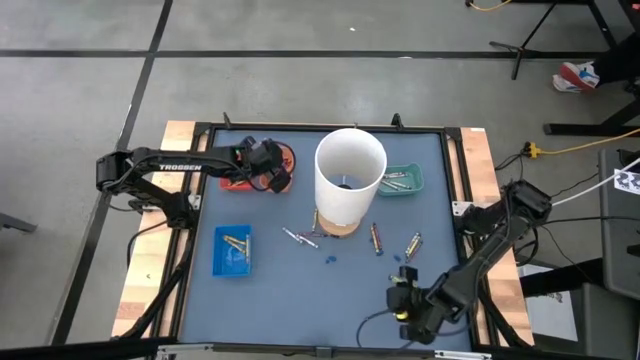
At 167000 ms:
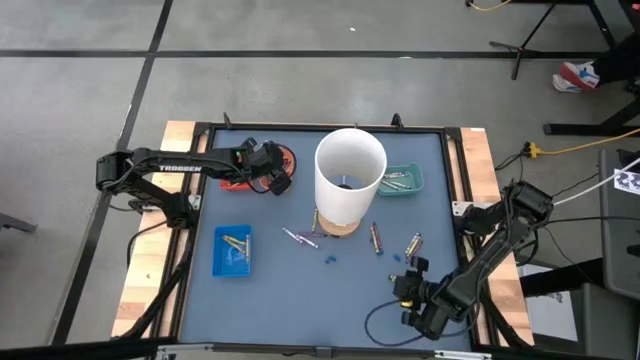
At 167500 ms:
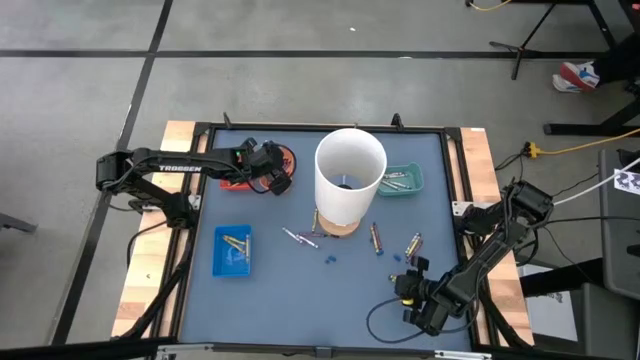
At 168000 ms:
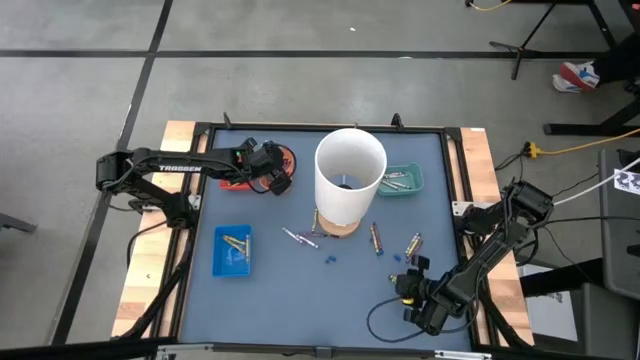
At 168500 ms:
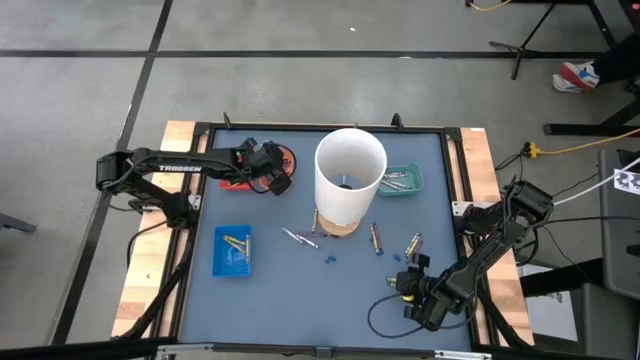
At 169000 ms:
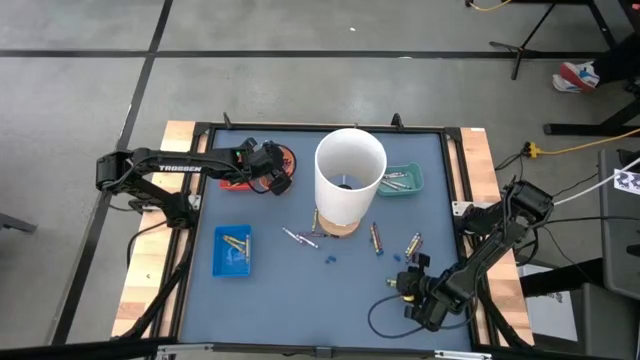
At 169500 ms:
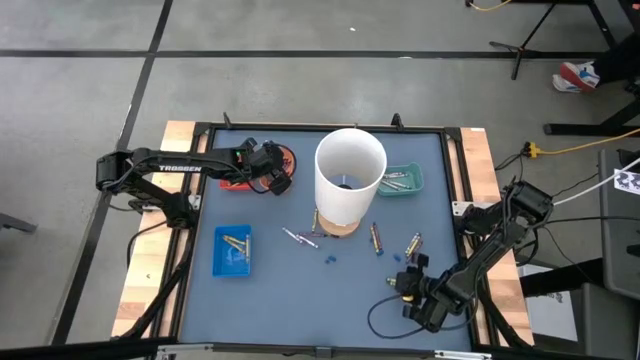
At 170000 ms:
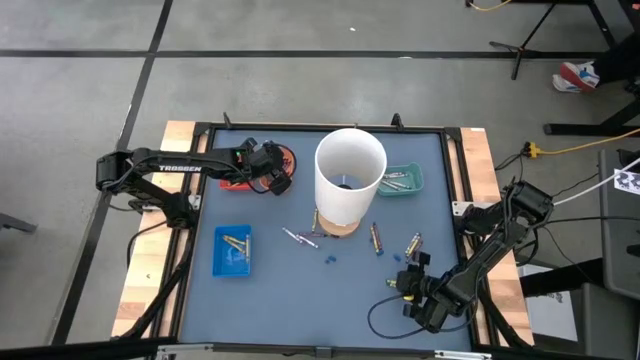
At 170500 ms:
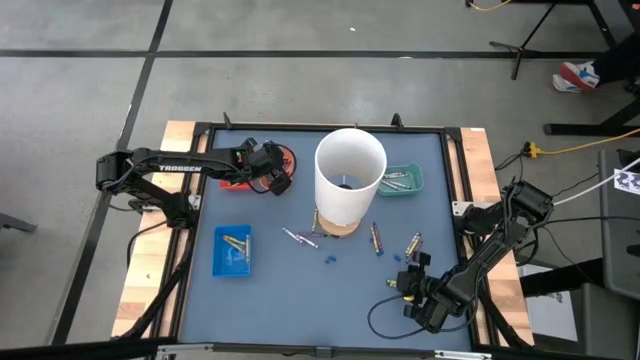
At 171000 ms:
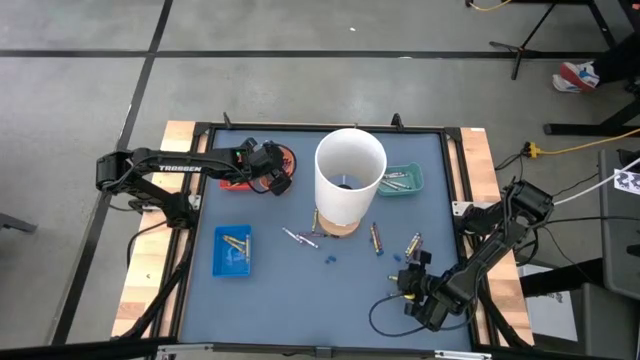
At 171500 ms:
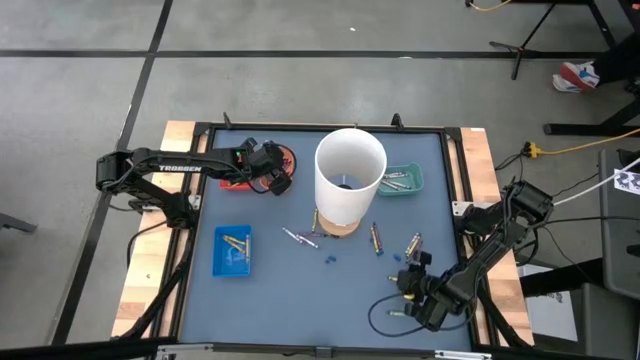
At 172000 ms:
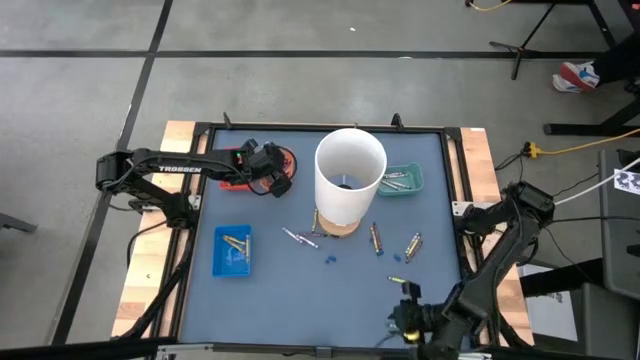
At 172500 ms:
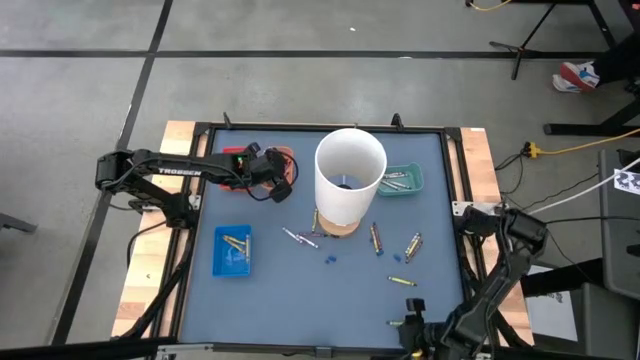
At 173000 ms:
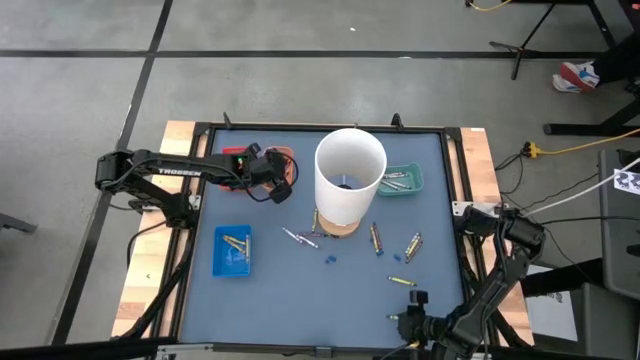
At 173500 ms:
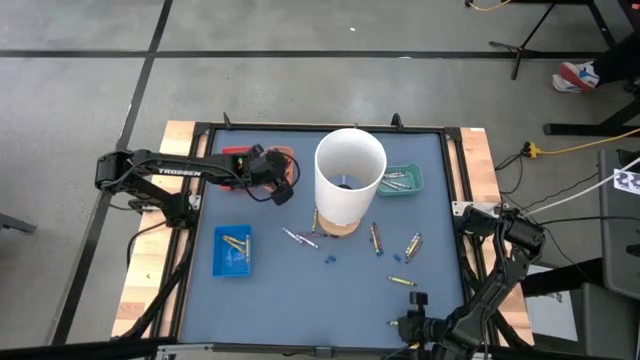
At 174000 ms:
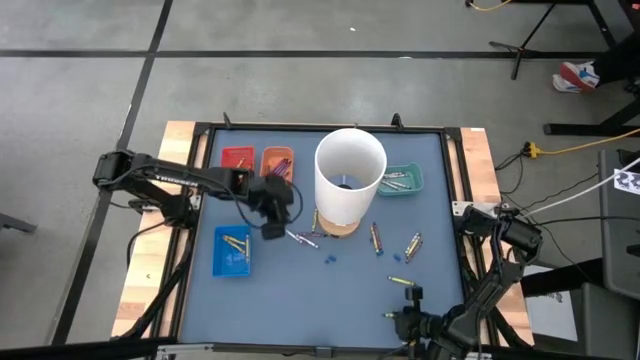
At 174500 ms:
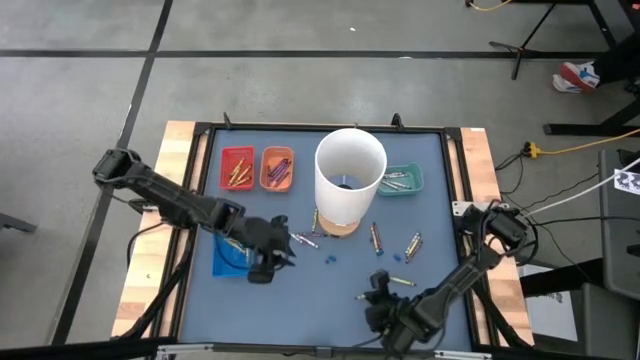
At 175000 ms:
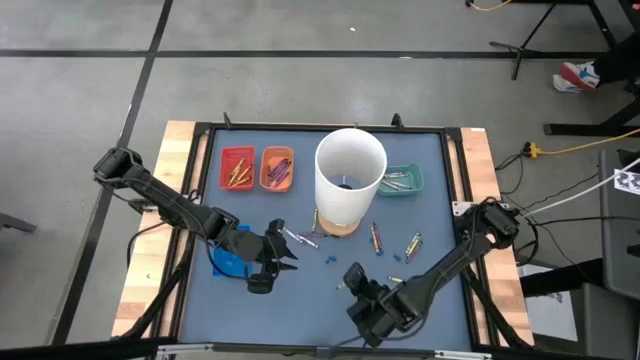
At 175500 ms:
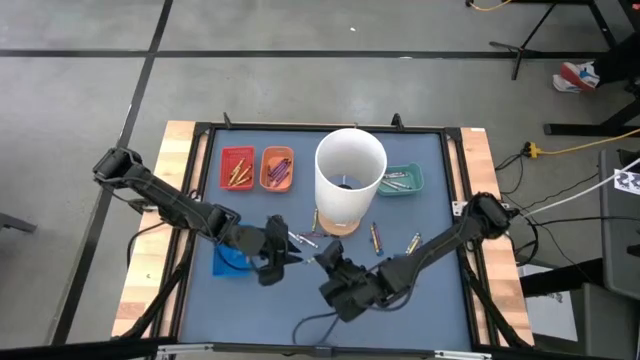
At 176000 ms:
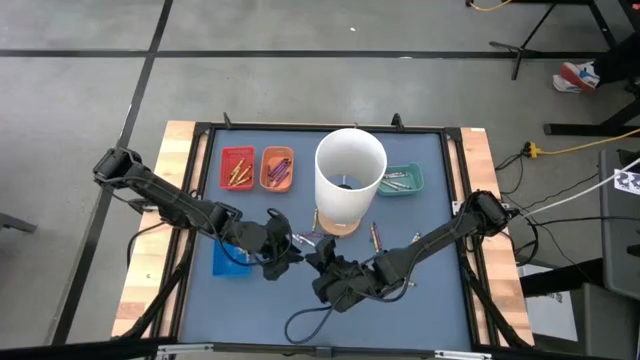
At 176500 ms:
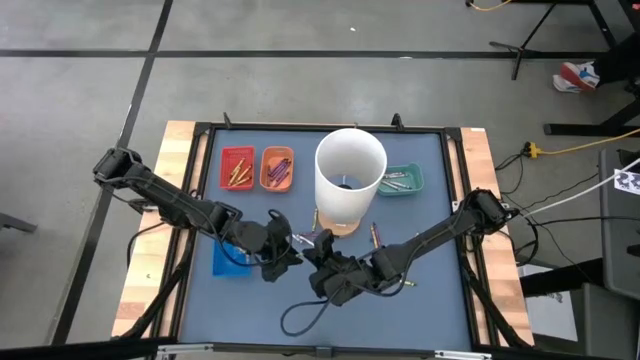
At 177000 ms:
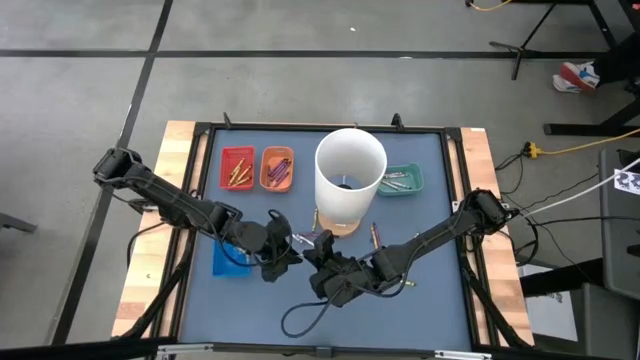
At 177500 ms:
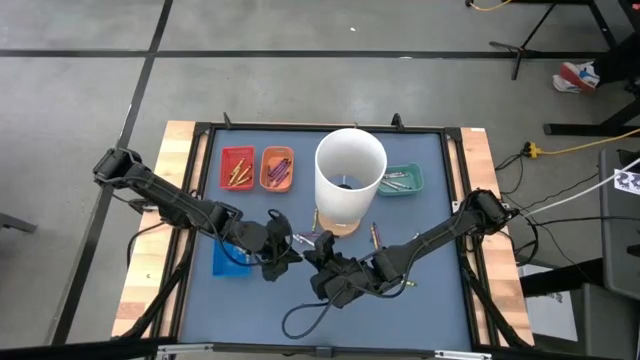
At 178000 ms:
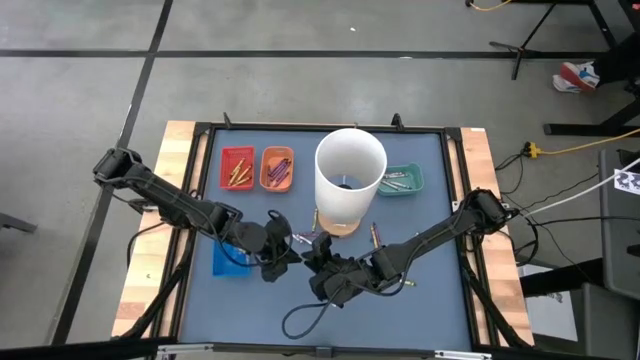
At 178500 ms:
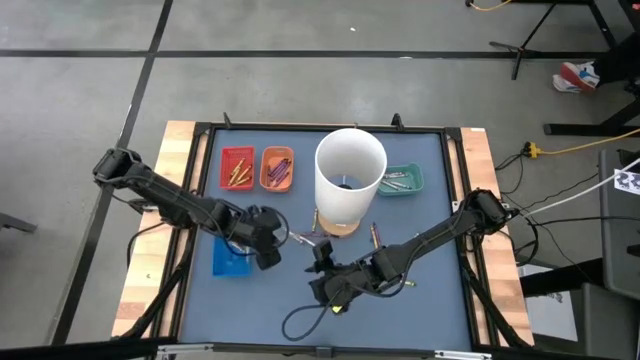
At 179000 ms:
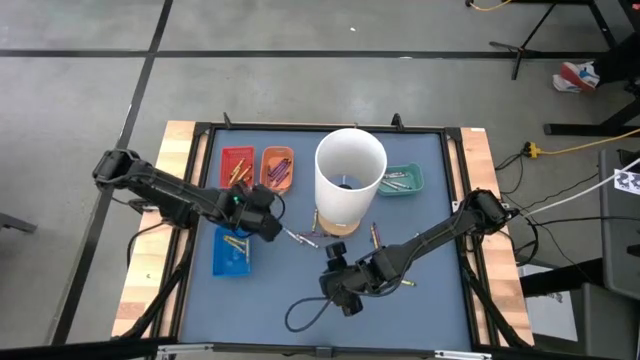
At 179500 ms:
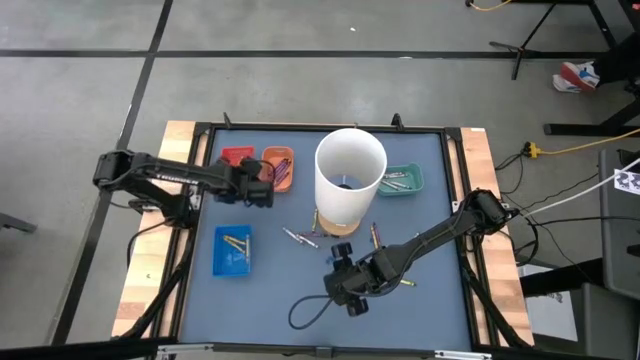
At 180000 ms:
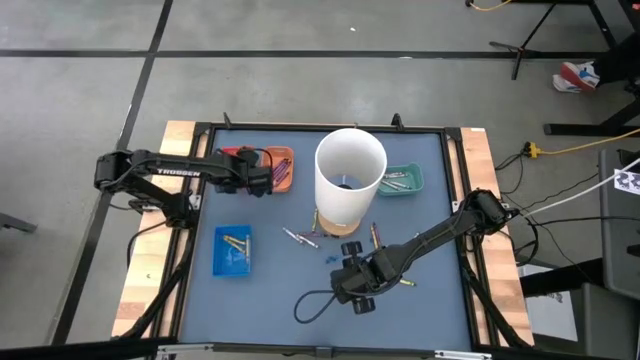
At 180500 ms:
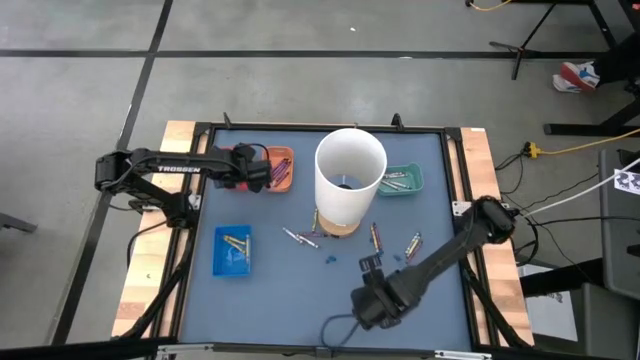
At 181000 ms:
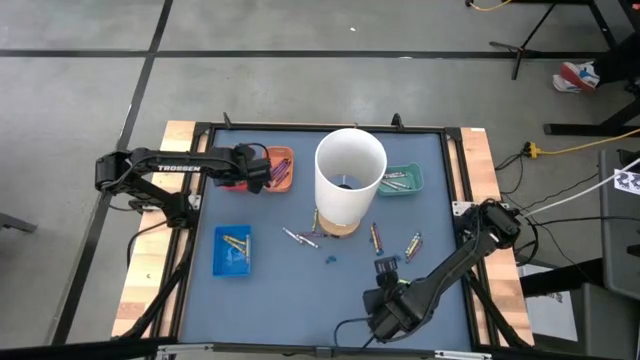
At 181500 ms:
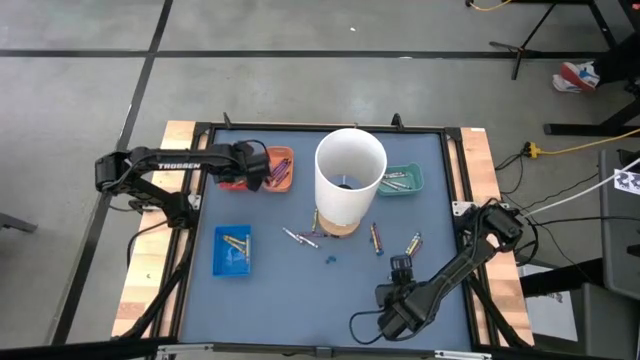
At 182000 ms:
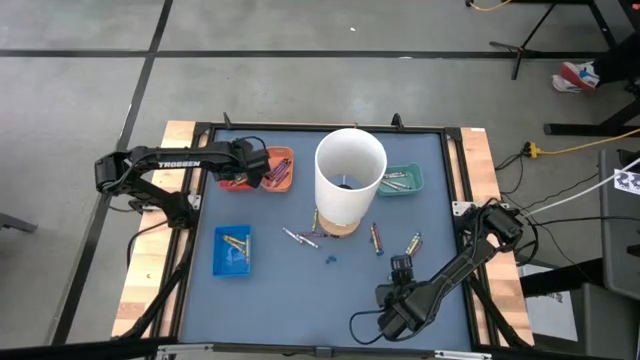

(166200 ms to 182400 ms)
Task: Sort crayons
Put the green crayon into the red bin

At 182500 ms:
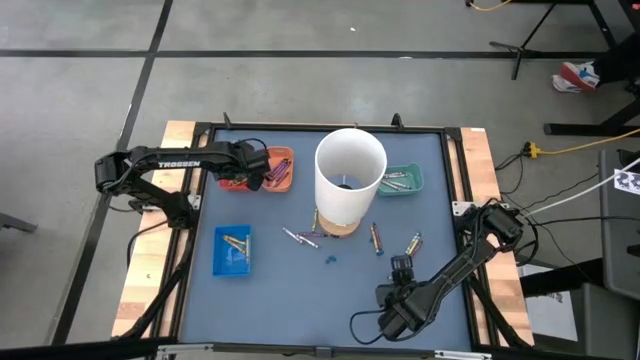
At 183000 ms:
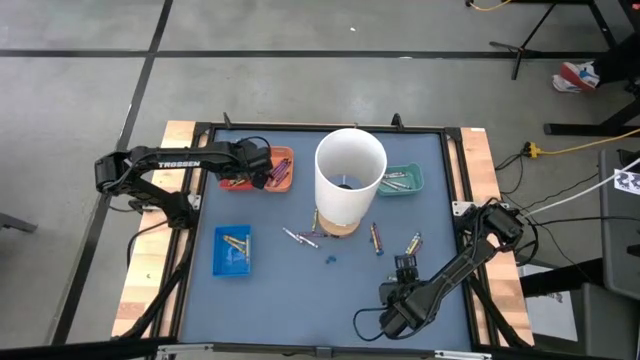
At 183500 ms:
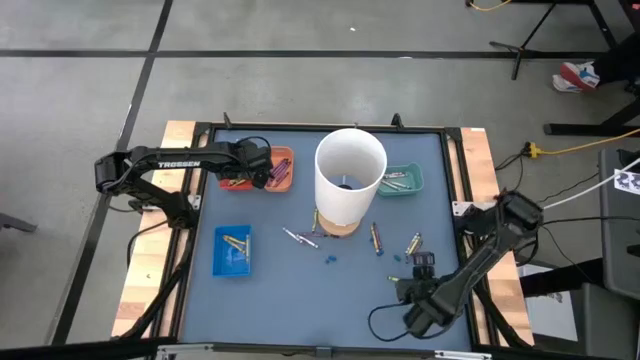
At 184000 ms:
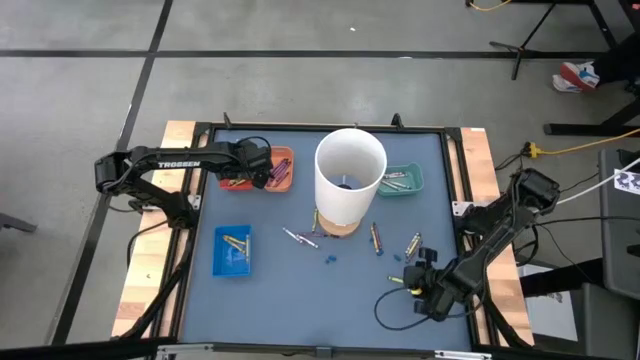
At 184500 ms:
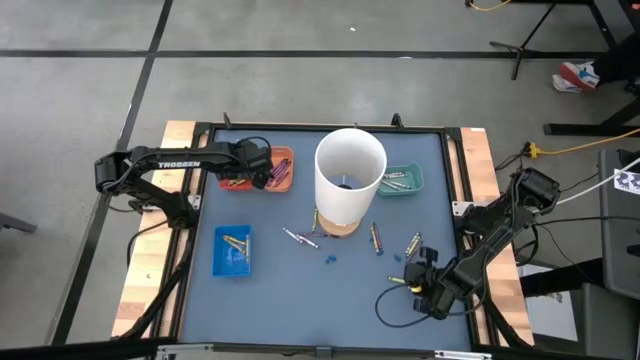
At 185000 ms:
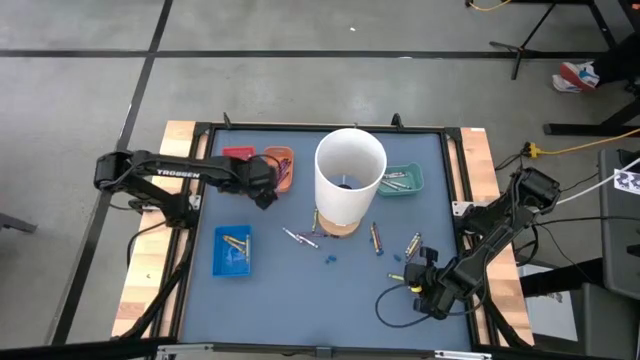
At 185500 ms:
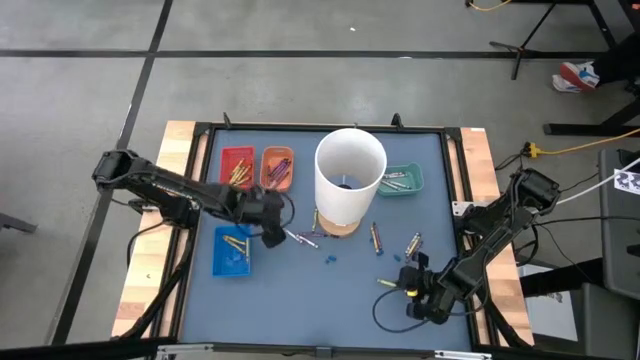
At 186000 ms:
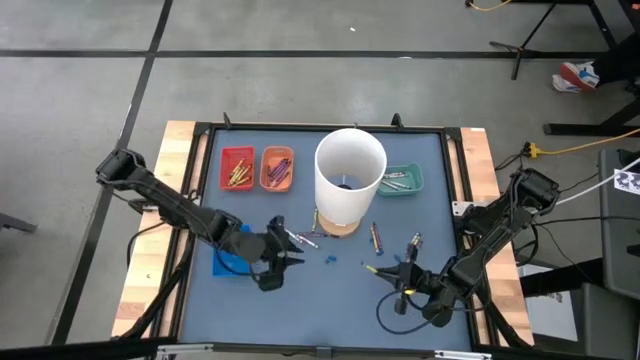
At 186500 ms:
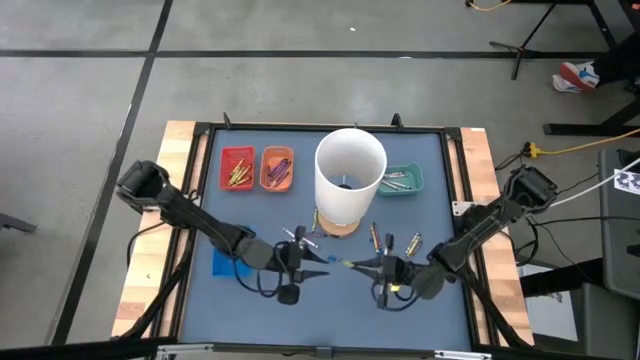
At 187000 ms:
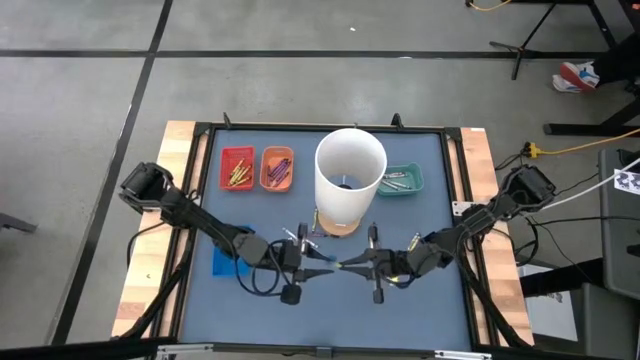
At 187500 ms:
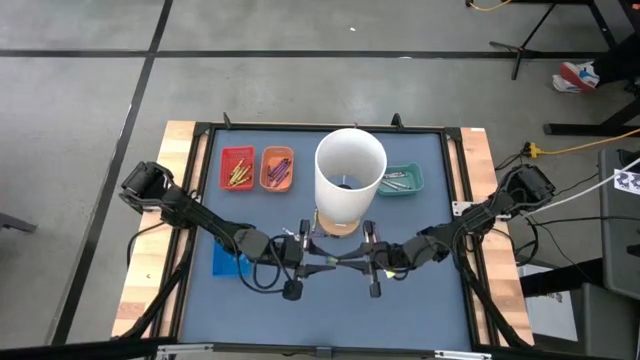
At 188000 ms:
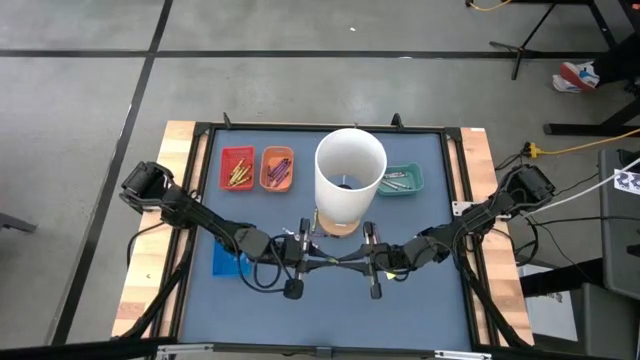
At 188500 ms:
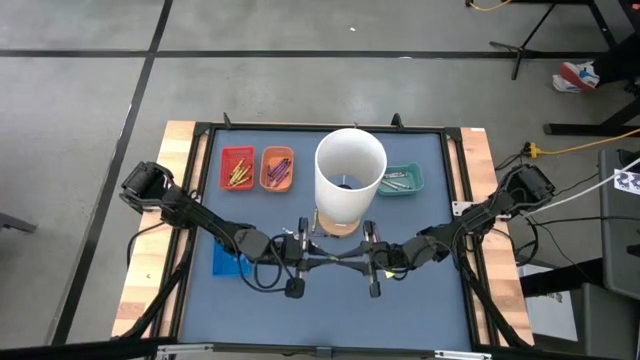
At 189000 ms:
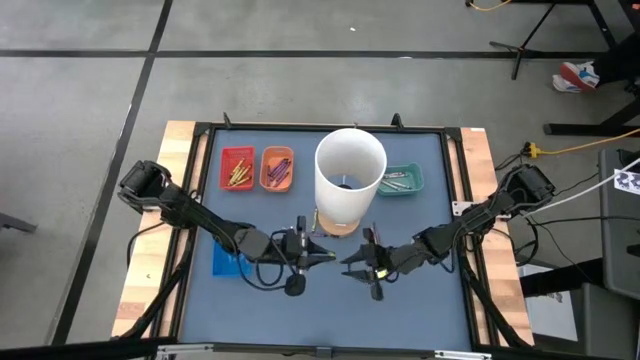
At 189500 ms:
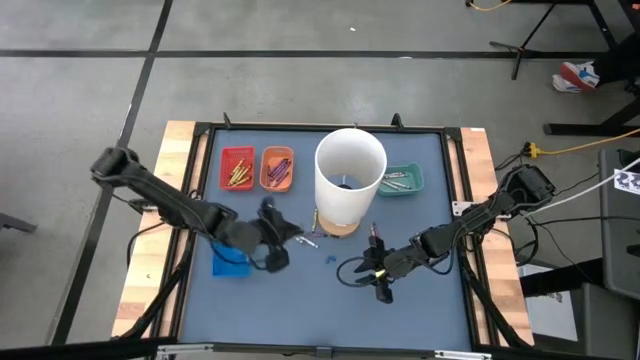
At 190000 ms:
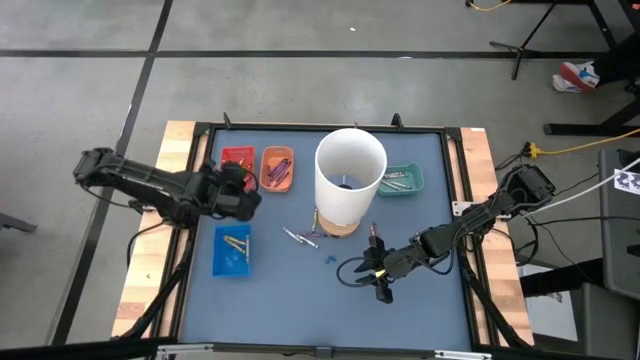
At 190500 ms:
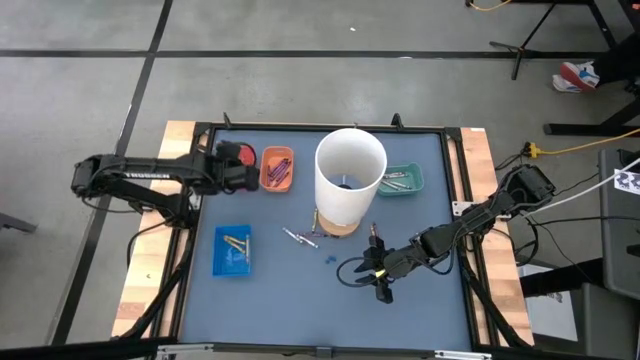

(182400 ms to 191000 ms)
Put the green crayon into the red bin
